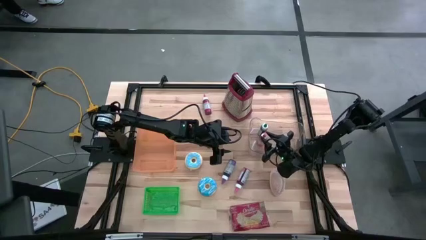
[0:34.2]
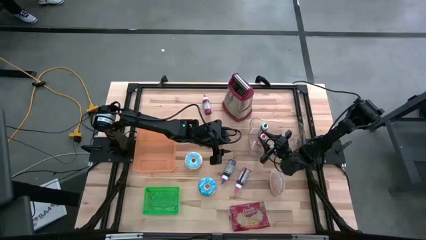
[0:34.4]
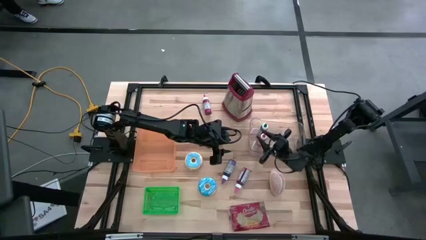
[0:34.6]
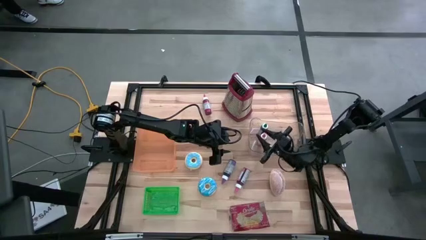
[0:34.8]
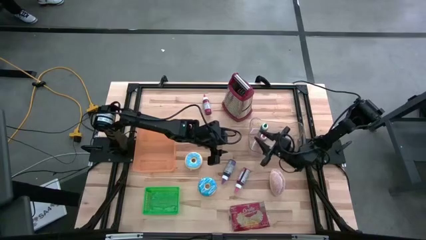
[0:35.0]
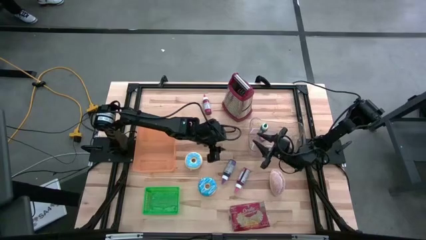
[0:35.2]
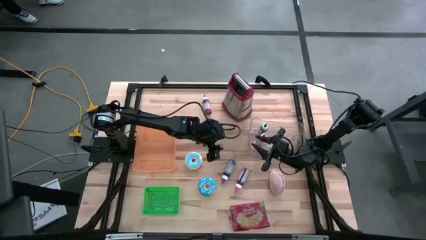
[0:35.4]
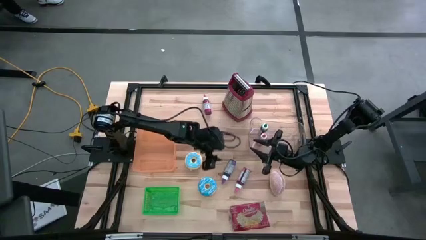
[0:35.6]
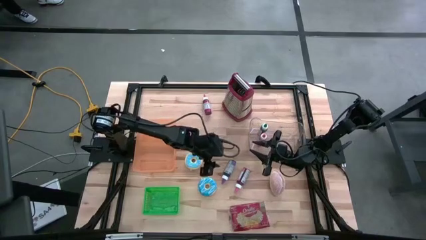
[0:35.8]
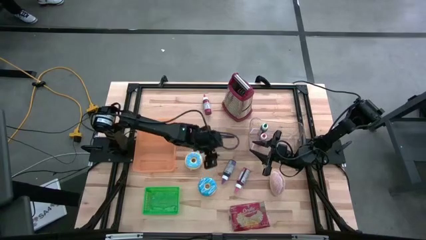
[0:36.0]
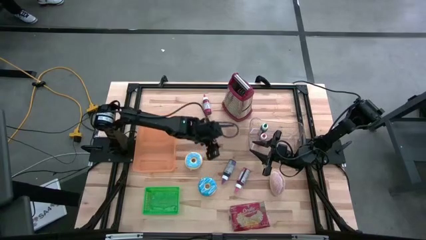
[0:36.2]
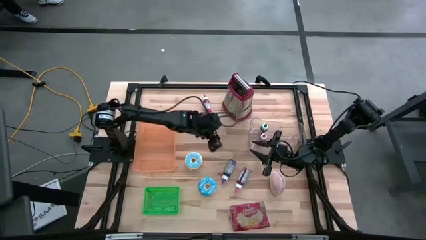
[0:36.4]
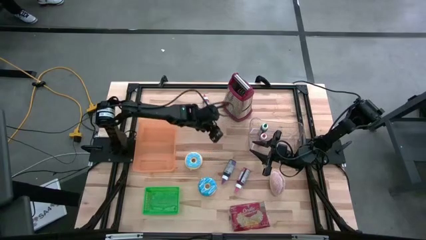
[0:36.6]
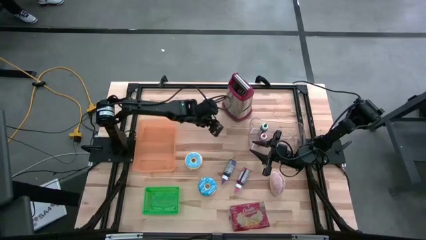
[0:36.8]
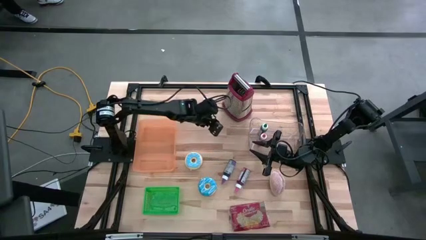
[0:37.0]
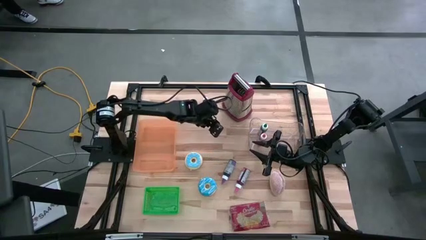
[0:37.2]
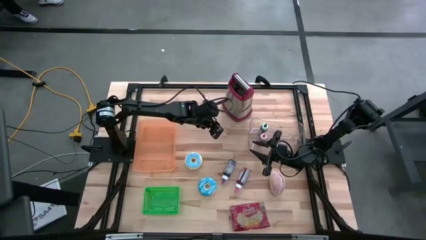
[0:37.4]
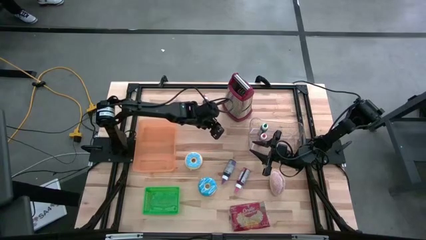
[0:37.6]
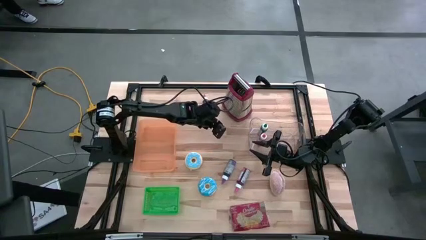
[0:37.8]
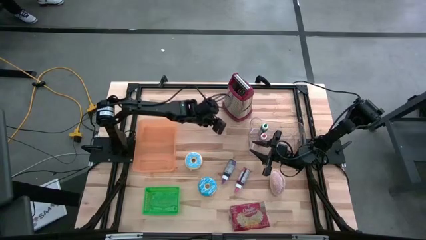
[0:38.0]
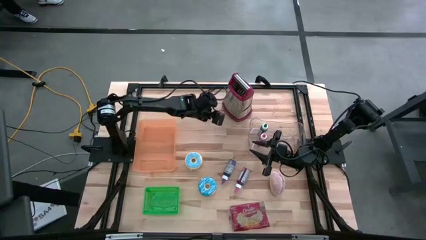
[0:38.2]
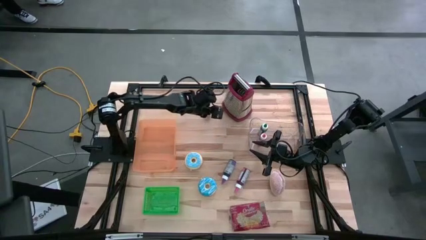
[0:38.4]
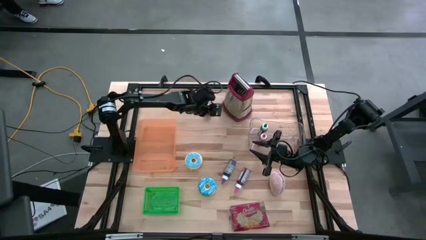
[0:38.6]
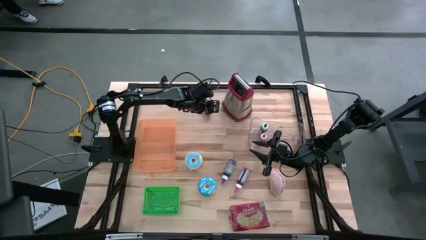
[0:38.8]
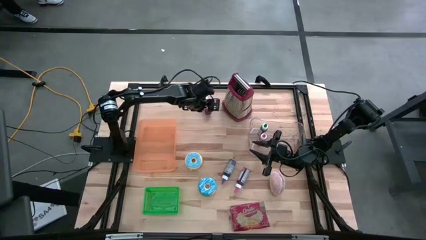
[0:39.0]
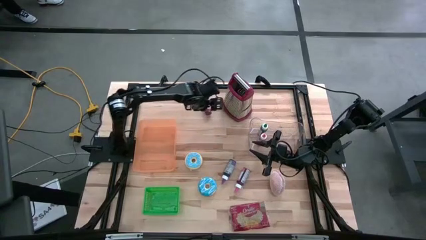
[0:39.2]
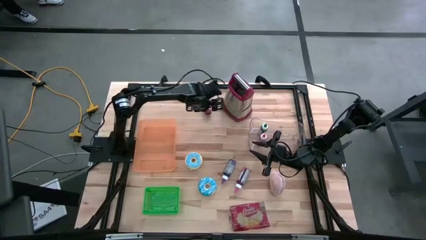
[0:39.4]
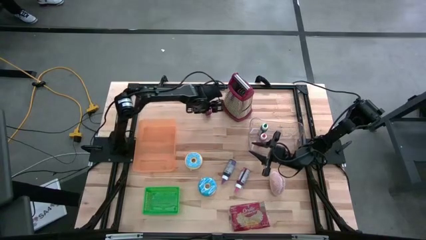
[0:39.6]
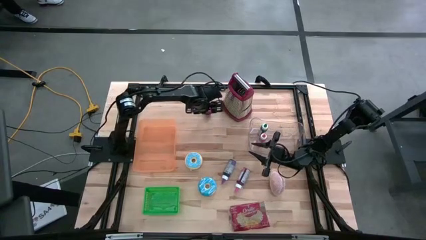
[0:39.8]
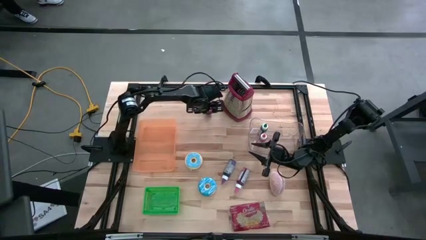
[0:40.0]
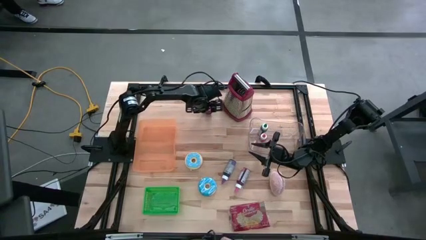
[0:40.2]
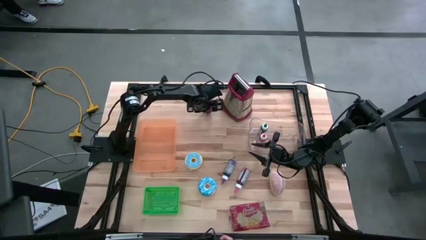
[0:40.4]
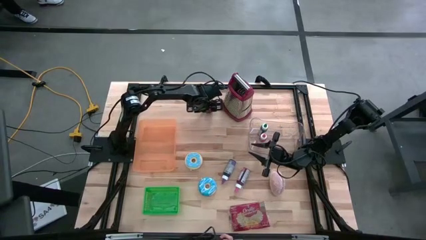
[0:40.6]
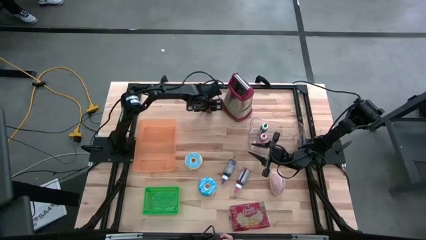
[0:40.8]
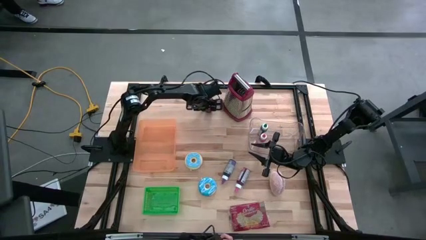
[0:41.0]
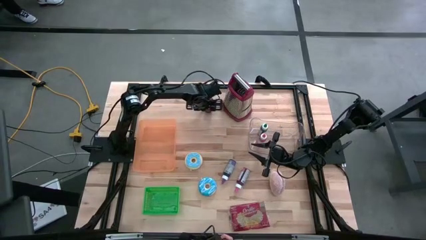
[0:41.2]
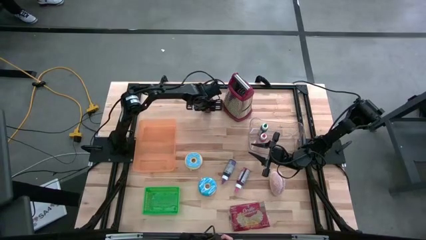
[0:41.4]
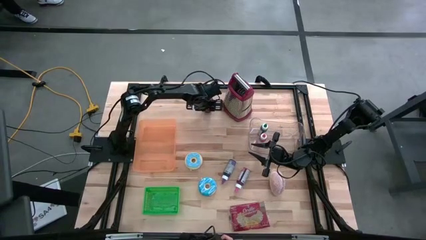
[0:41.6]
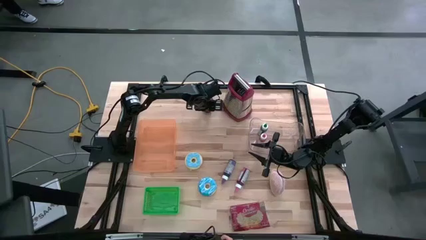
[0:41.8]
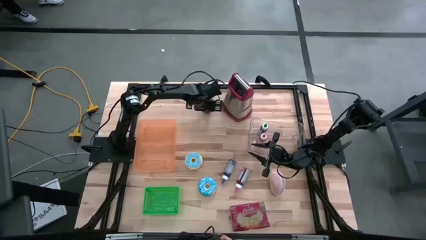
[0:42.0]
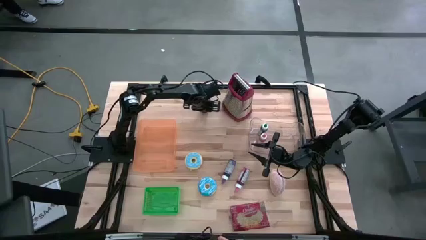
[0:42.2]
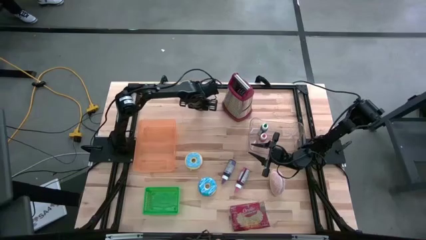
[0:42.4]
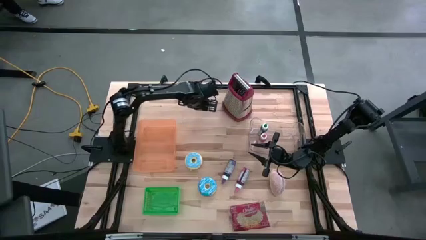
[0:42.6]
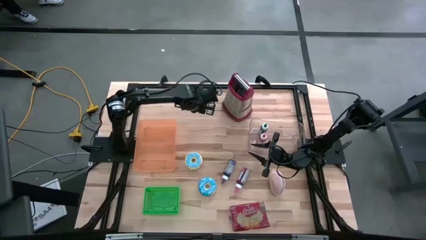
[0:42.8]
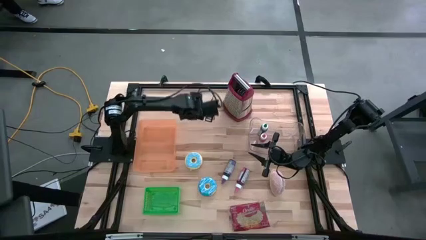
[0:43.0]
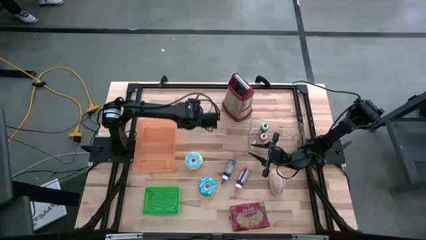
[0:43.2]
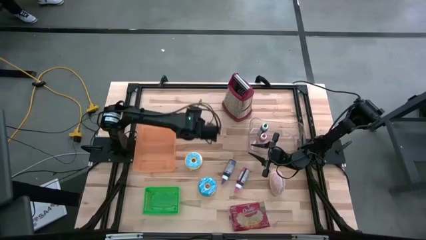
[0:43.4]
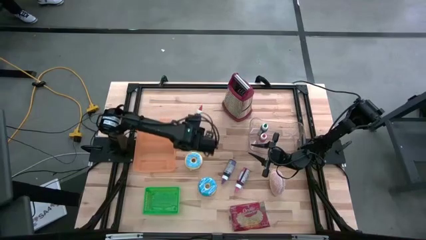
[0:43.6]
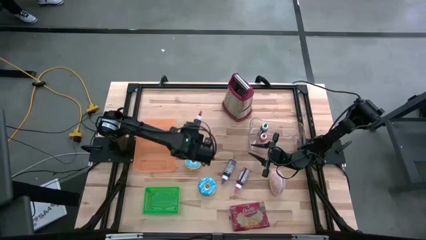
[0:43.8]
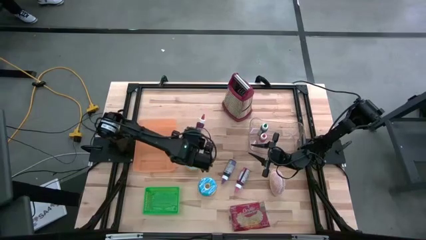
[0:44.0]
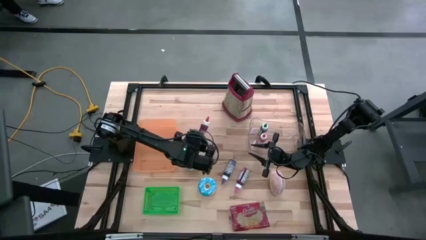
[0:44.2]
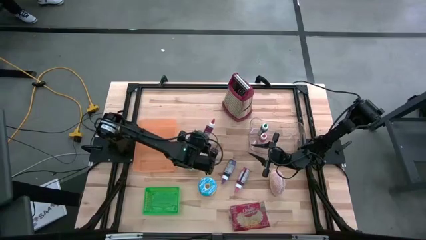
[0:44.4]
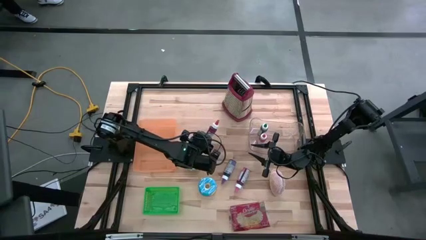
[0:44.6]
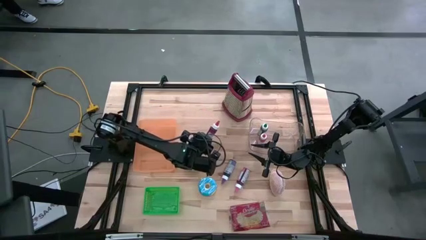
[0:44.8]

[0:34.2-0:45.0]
Put the red food coloring into the transparent bin

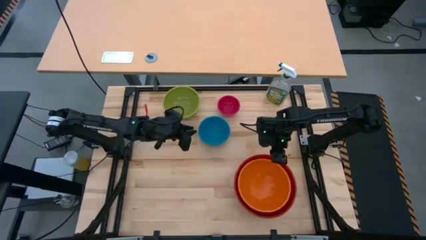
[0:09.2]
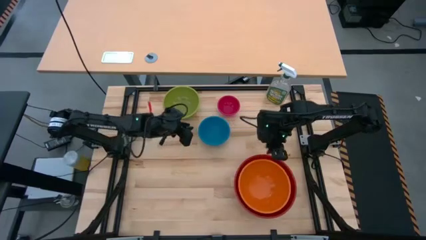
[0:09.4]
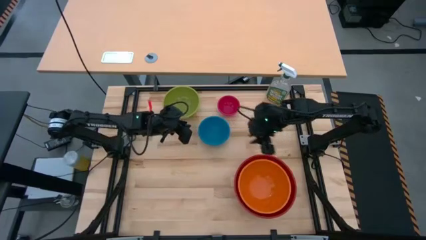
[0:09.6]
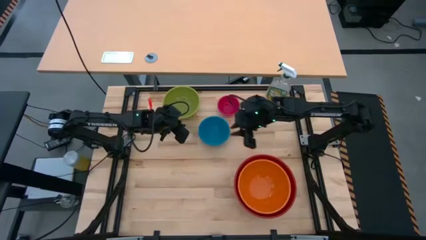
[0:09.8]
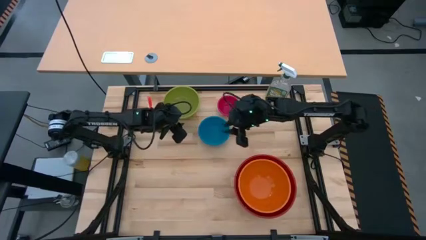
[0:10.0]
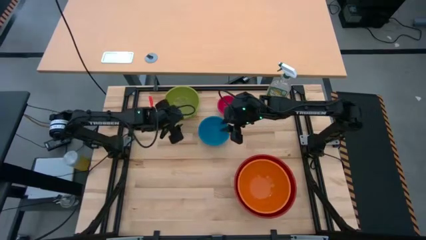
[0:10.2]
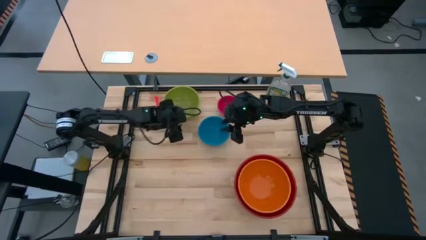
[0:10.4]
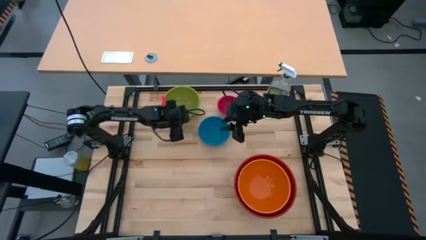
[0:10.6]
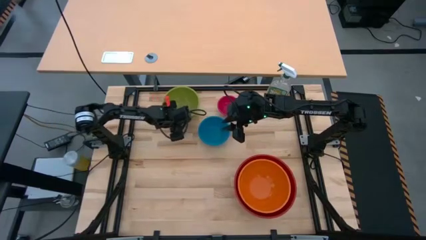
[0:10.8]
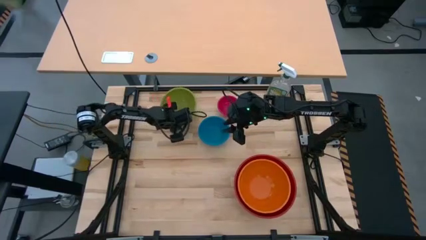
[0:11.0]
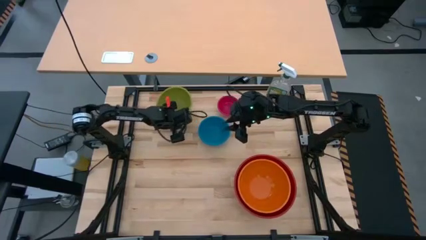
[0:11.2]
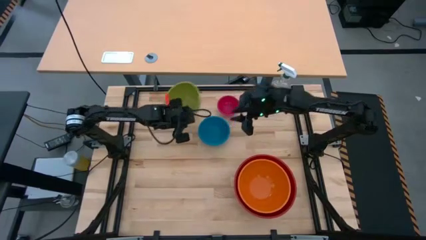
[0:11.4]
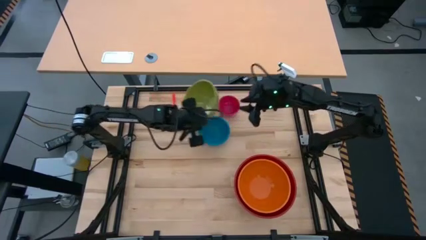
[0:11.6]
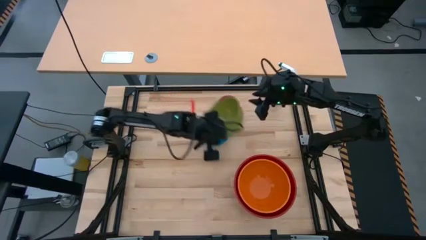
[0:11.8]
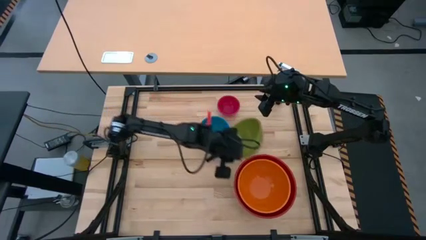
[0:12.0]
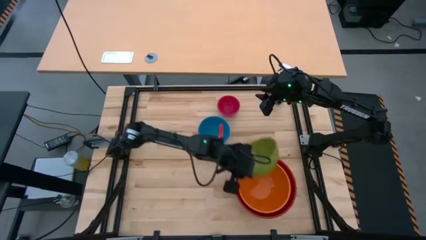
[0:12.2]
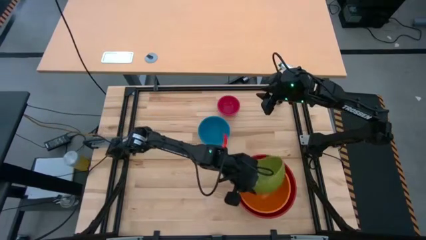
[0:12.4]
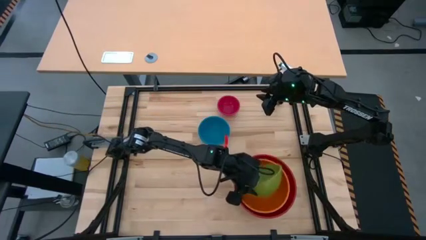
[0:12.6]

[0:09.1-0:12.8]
Stack the green bowl on top of the orange bowl

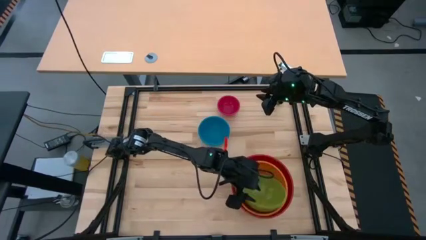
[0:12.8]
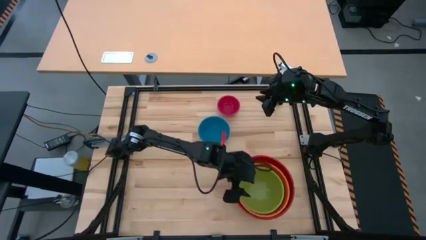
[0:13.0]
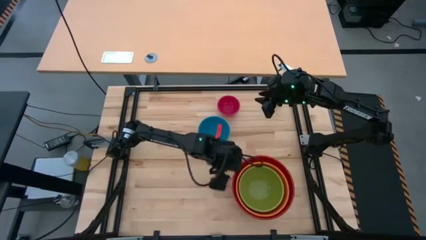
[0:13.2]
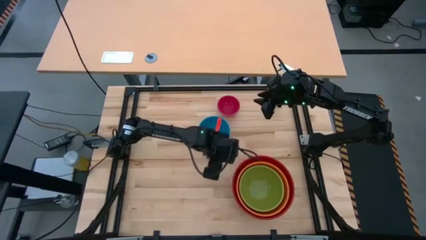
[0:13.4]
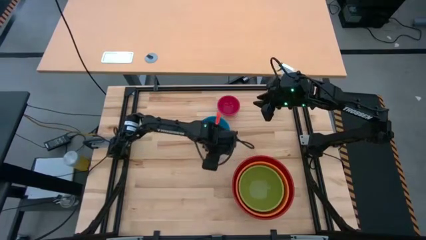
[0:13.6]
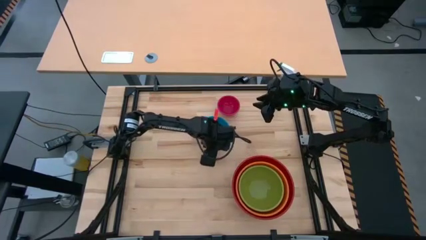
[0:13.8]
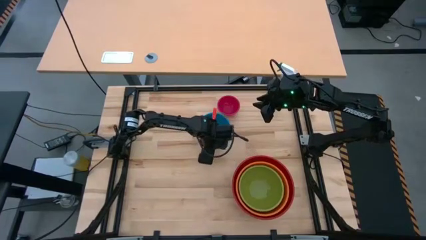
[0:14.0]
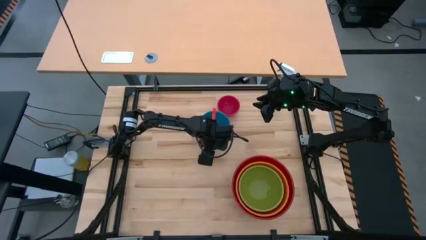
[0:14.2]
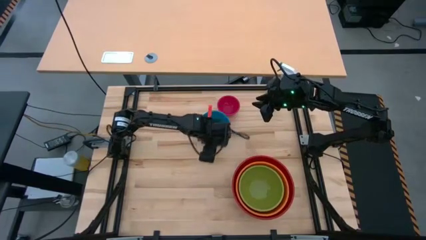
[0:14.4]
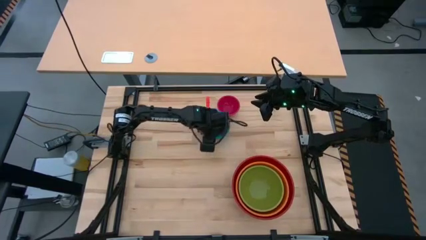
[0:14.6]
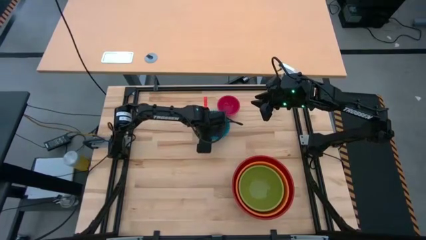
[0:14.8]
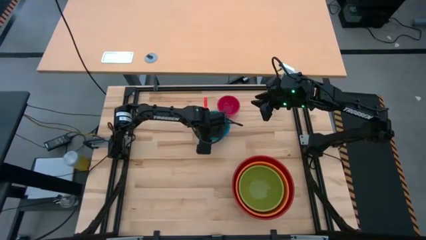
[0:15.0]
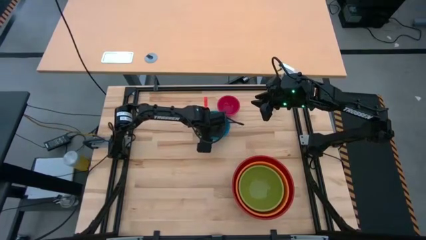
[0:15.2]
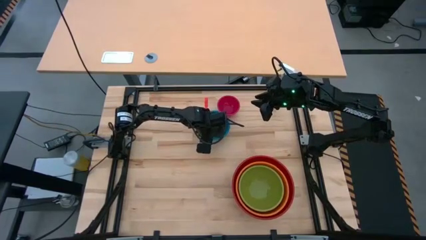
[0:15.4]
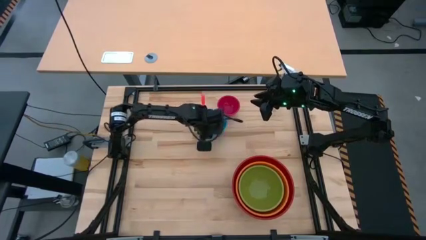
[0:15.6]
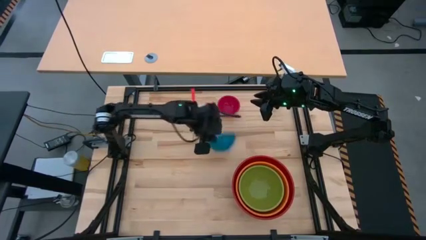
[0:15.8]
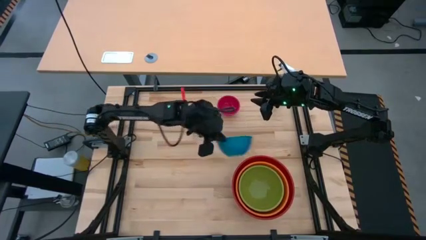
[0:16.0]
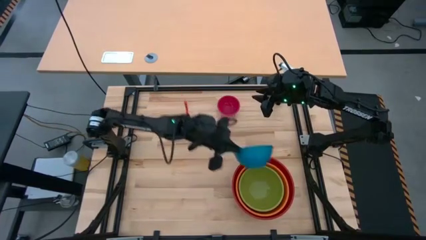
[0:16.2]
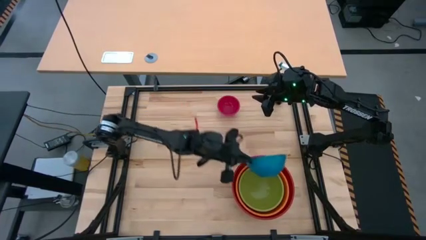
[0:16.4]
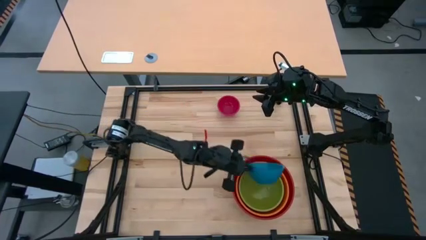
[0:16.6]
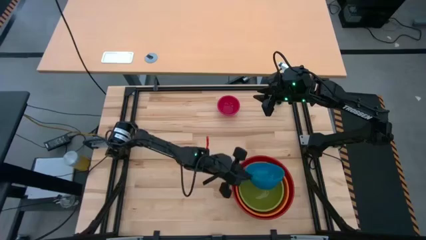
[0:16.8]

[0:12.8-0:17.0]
Stack the blue bowl on top of the green bowl
